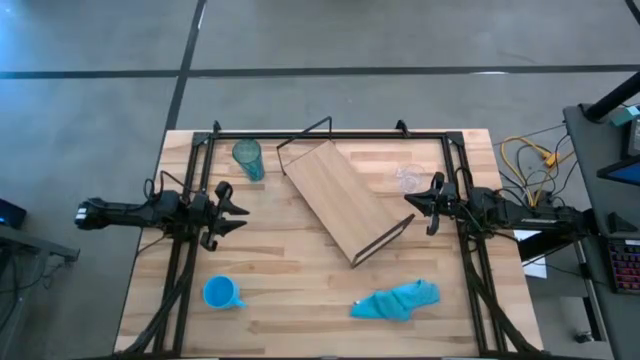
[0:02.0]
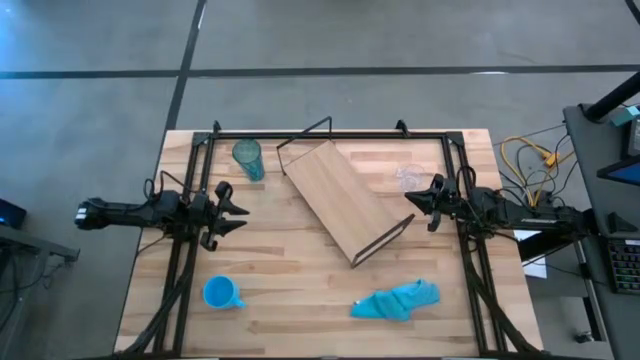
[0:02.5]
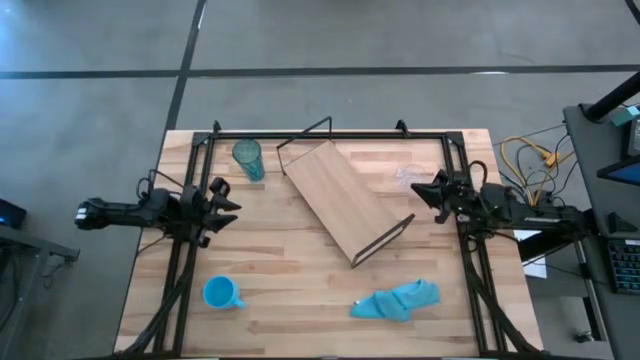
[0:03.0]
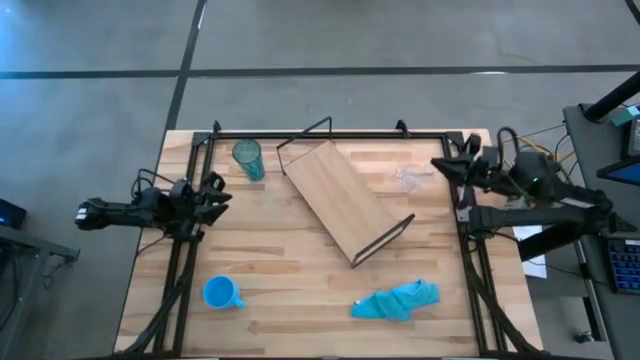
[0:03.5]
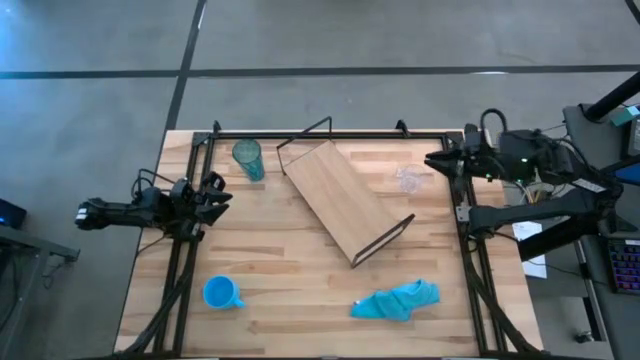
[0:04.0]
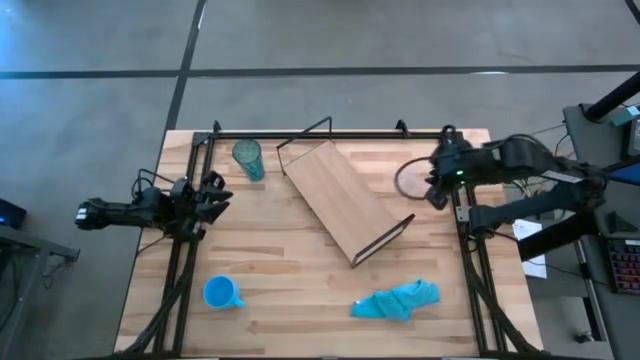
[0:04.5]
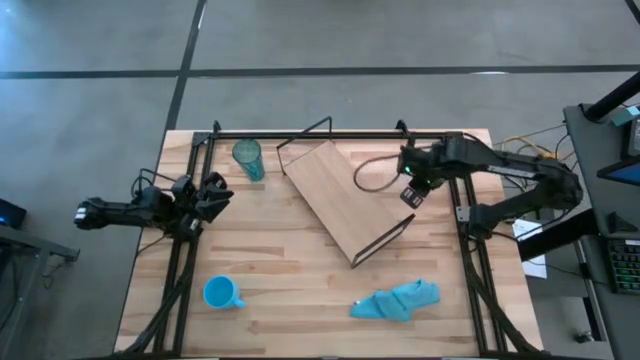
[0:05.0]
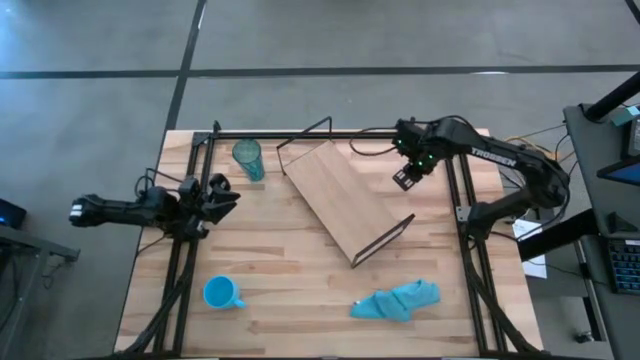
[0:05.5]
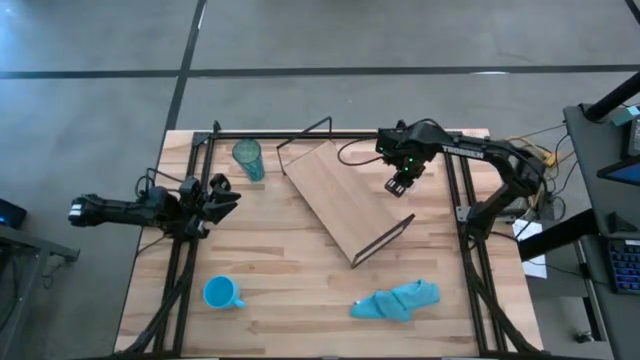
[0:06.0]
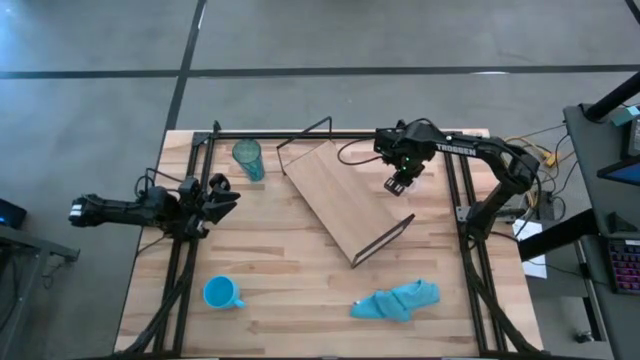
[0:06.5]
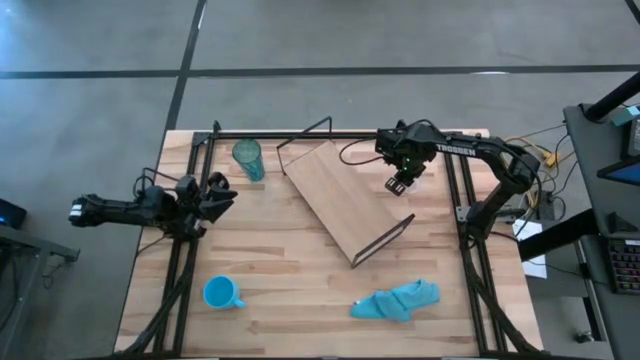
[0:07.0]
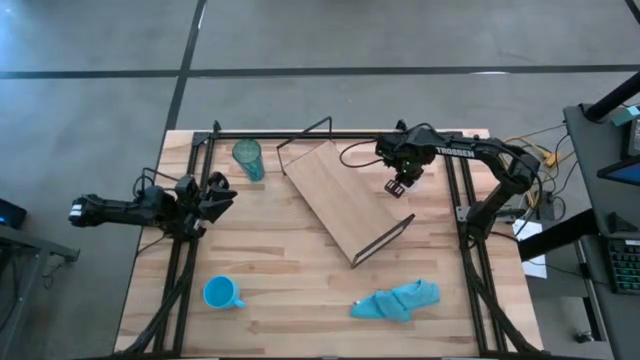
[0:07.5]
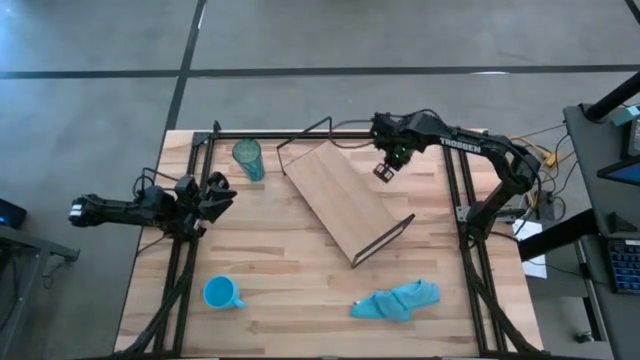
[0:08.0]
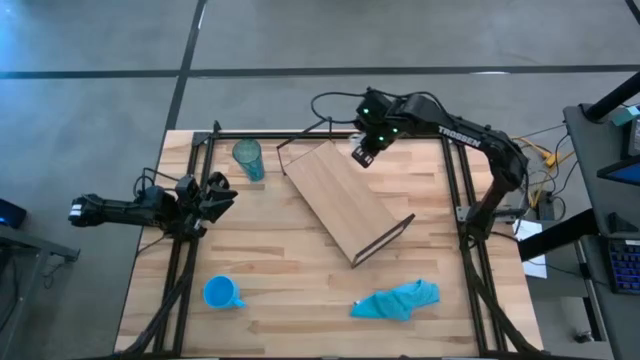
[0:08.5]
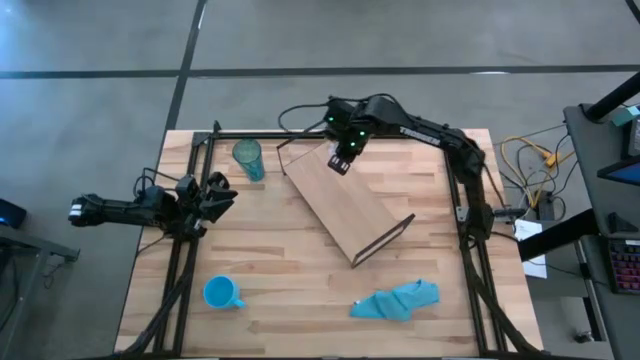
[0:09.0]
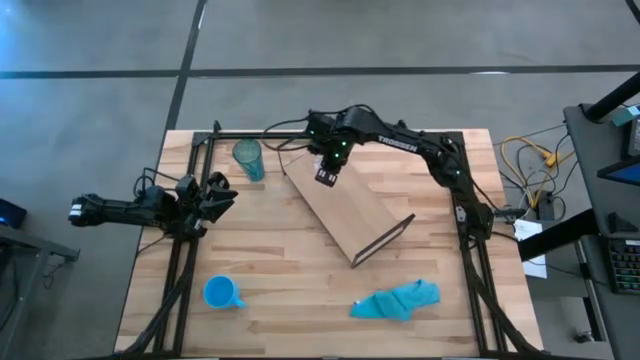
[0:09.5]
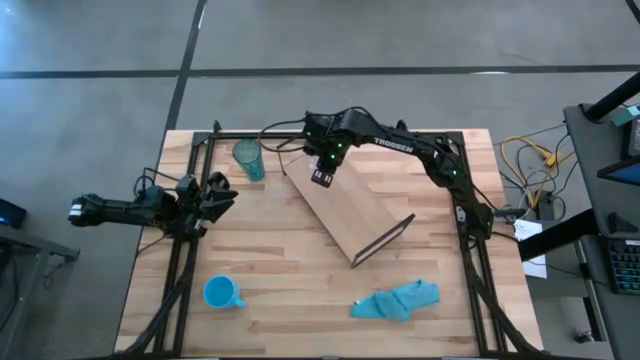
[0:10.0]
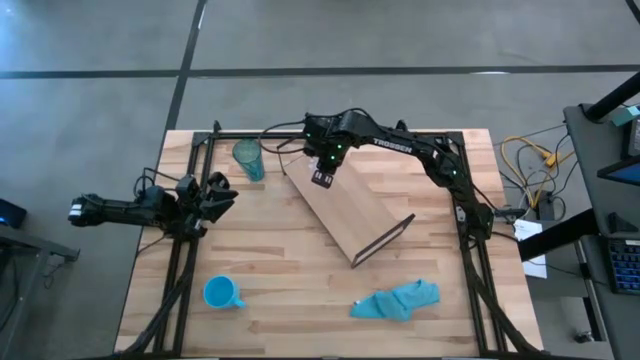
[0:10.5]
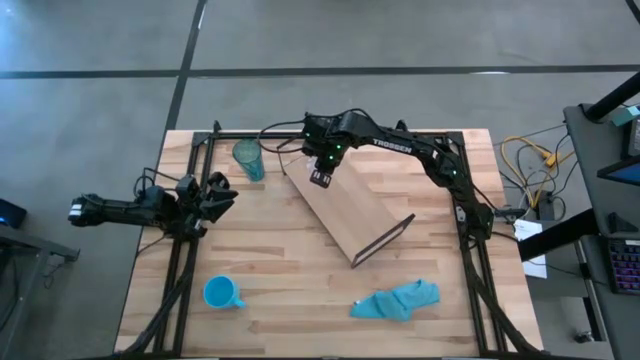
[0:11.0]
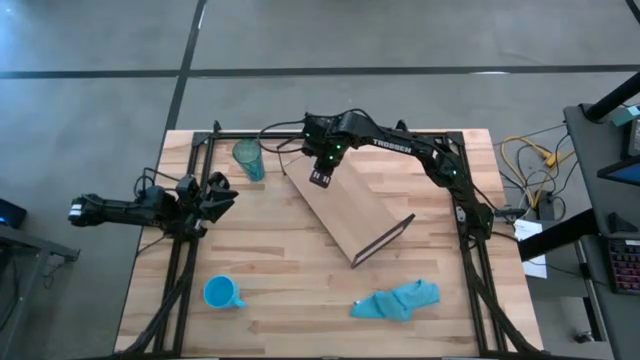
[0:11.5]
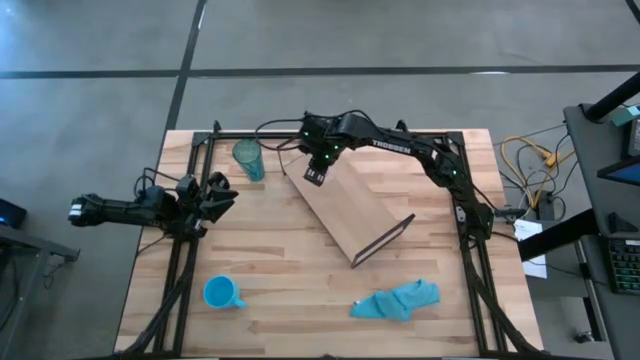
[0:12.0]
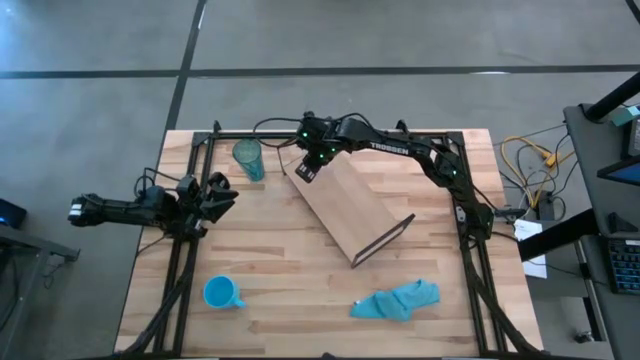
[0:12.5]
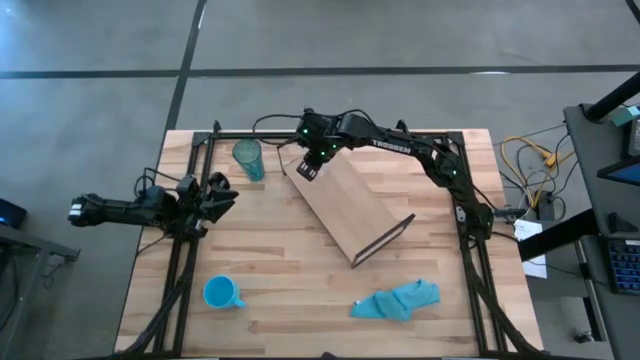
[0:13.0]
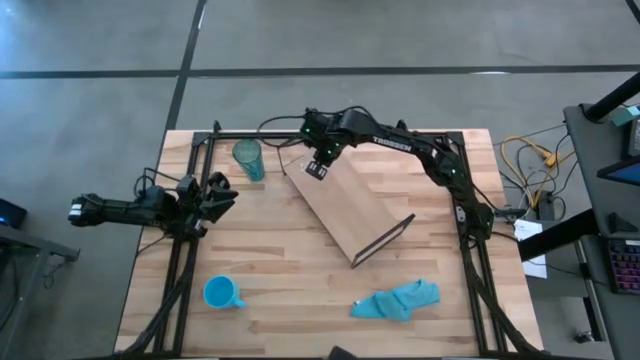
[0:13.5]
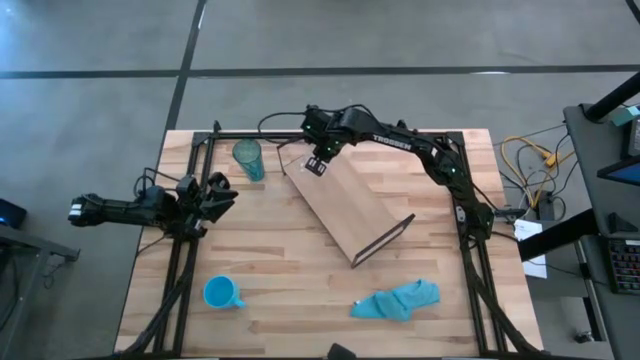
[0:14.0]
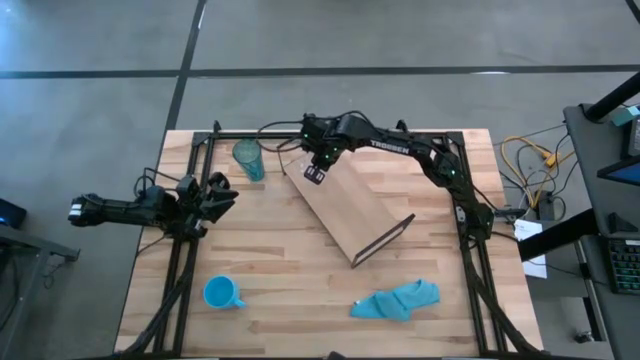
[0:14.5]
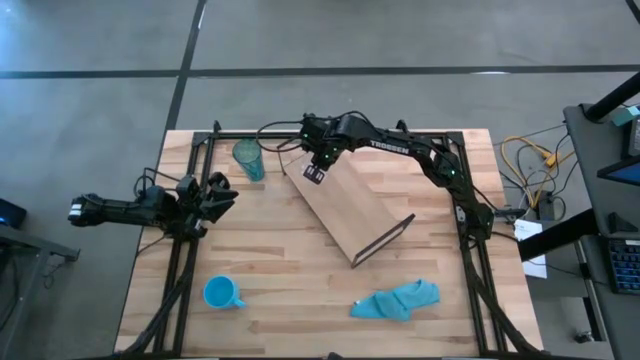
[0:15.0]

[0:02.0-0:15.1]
Task: Stack small to large cups/mugs on shelf
Put the transparent mug on the shelf

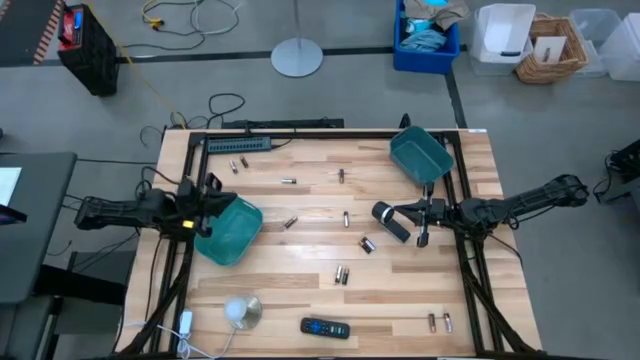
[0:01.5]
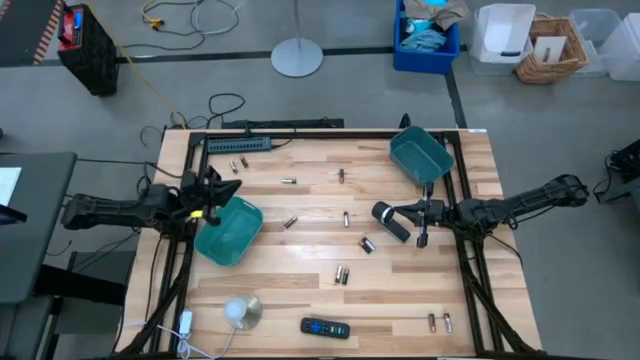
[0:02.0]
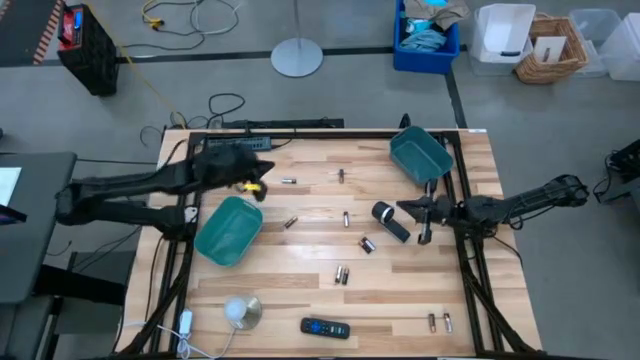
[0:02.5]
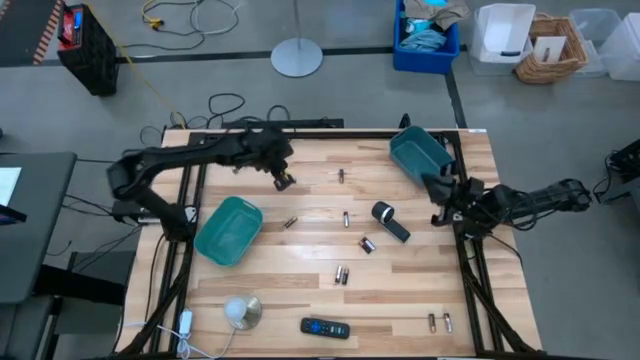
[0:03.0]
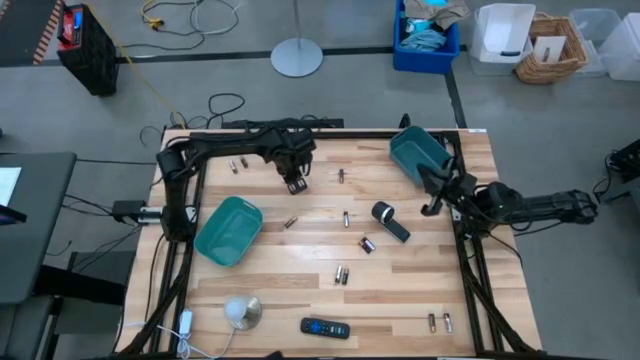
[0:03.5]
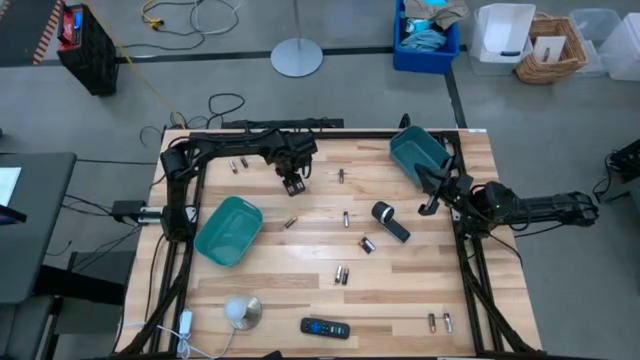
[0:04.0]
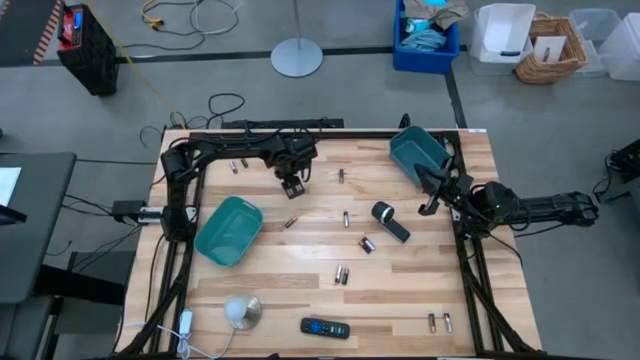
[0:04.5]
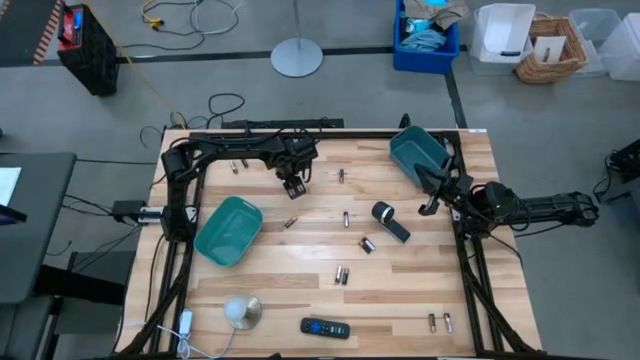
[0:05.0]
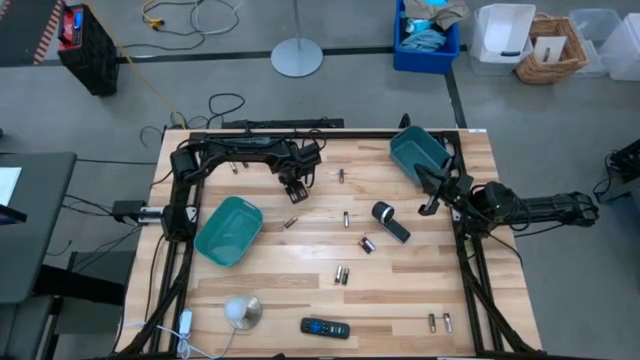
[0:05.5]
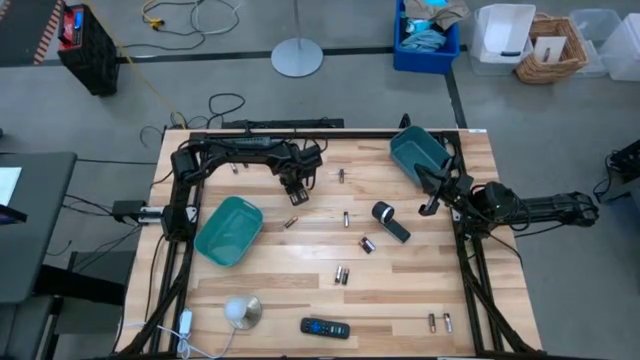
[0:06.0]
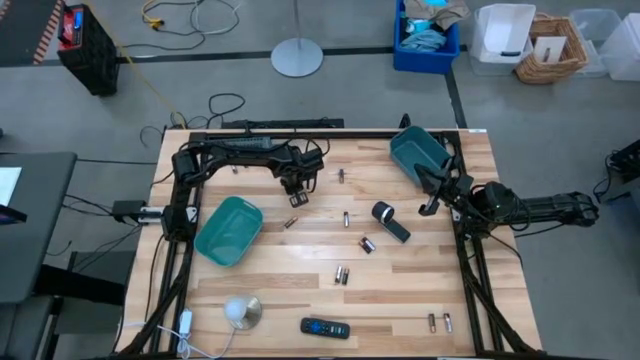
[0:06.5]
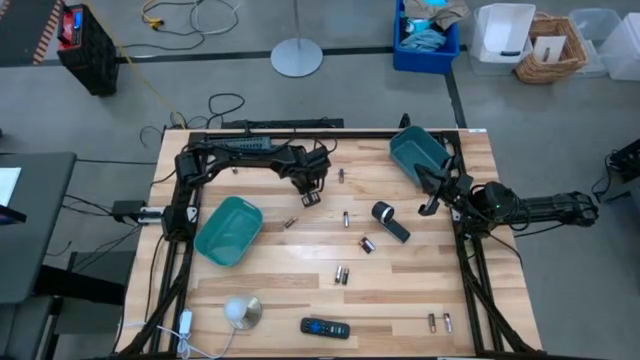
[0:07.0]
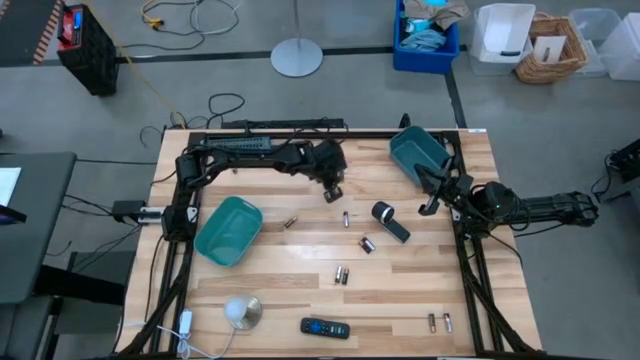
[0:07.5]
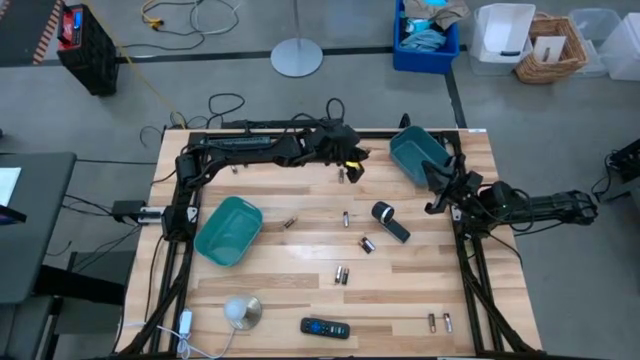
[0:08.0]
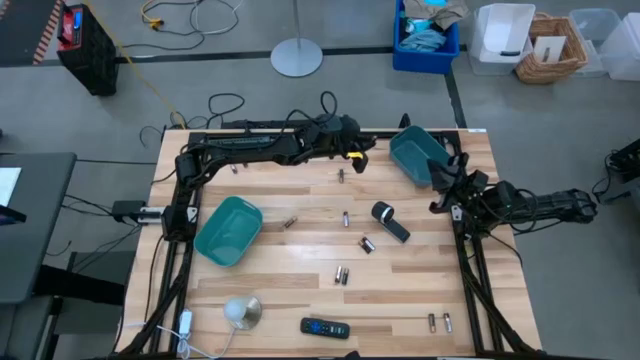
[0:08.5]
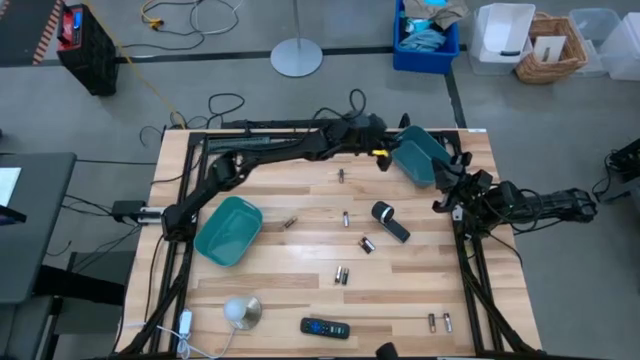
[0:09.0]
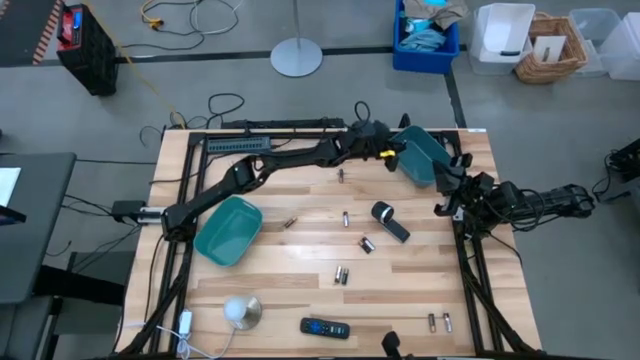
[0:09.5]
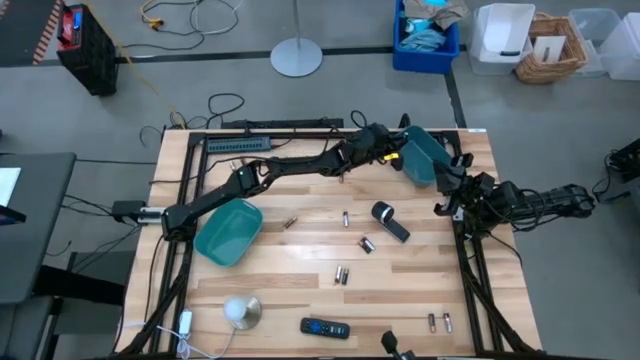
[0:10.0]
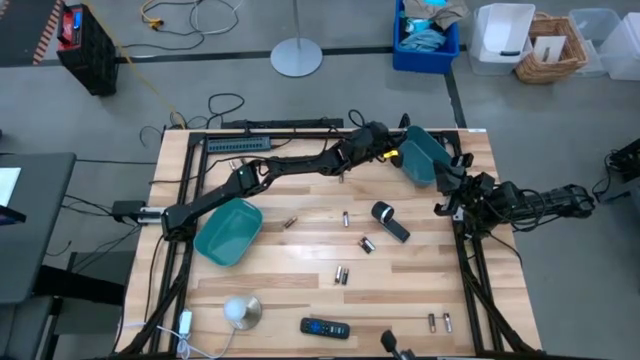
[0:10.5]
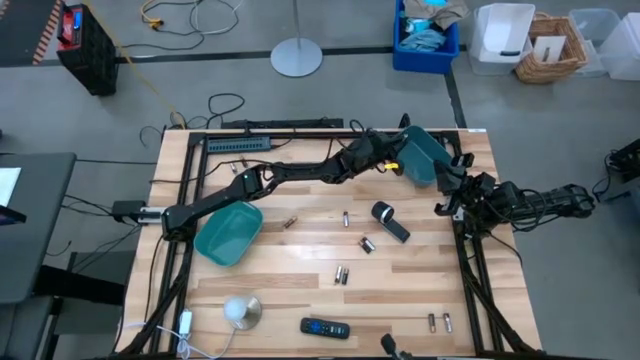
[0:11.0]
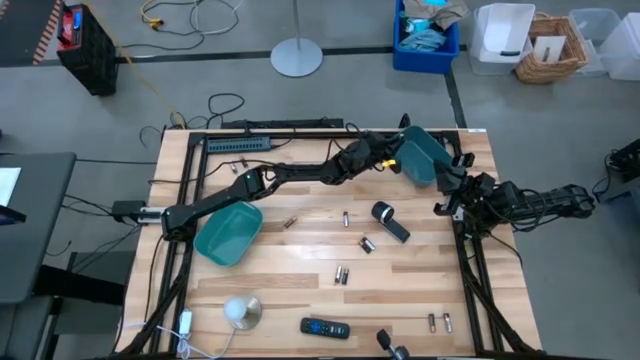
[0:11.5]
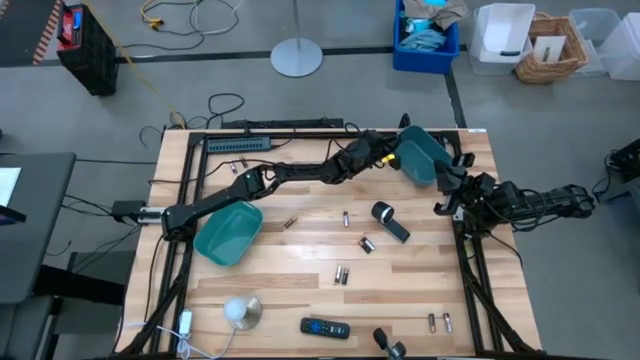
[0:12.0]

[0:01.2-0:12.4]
Task: Sort batteries
Put the silver battery into the blue bin
